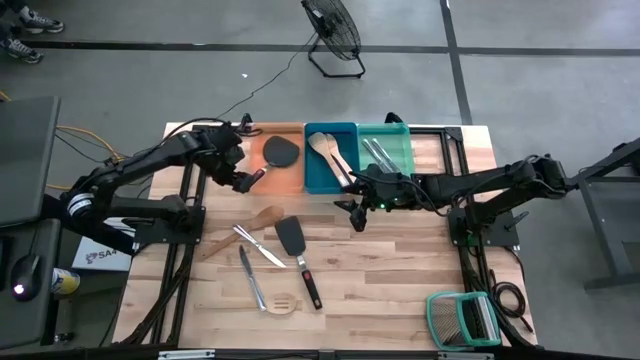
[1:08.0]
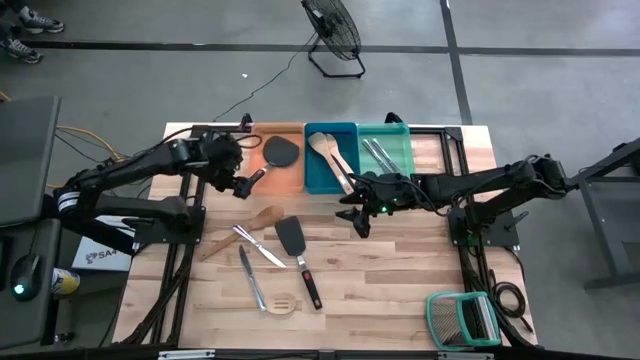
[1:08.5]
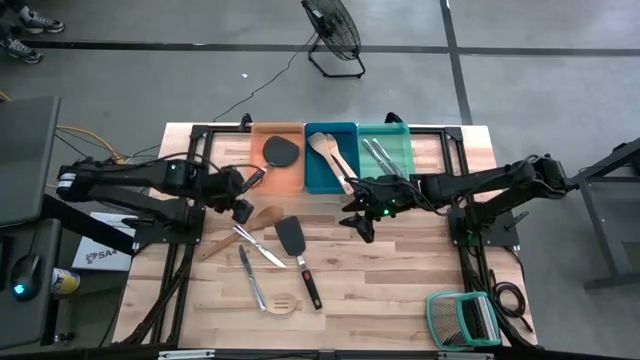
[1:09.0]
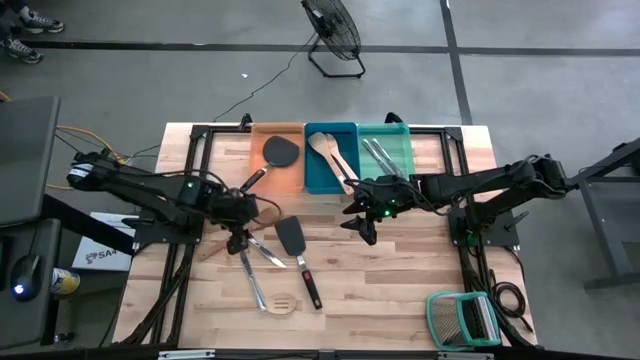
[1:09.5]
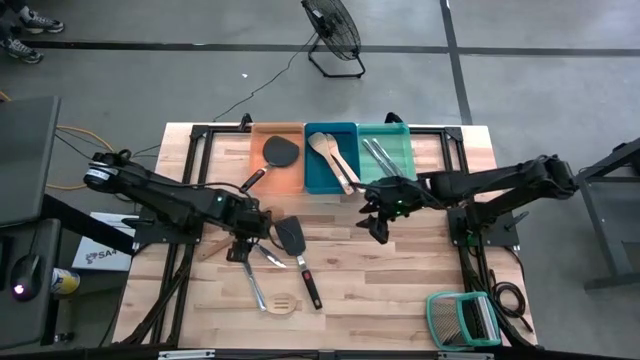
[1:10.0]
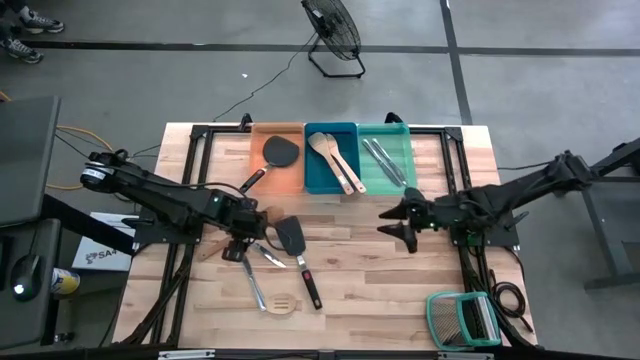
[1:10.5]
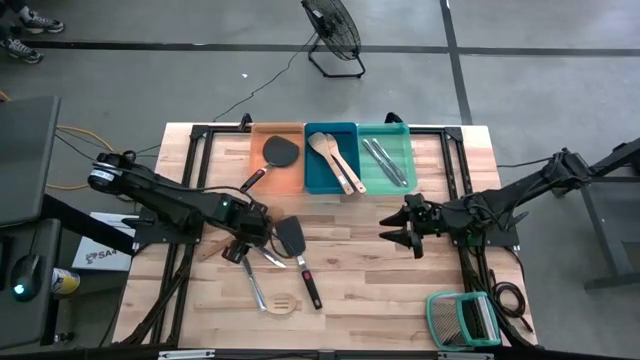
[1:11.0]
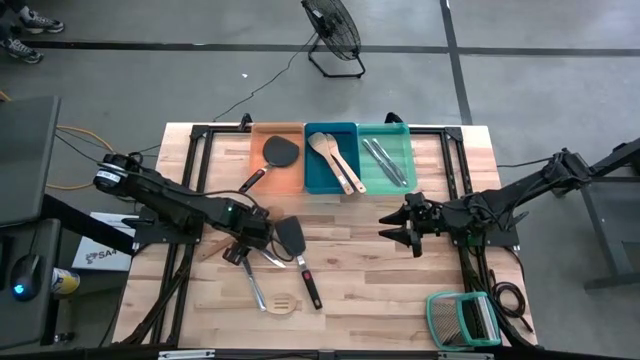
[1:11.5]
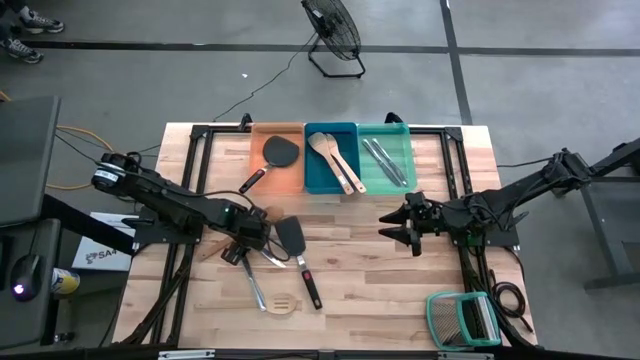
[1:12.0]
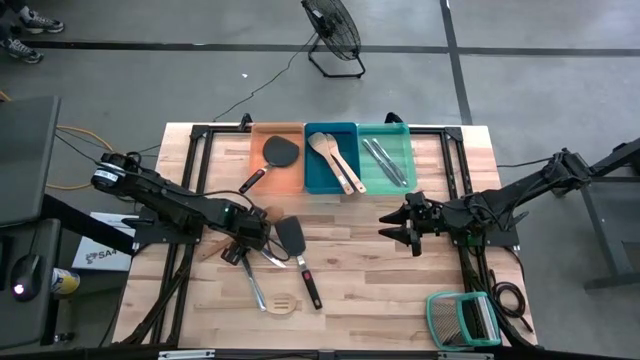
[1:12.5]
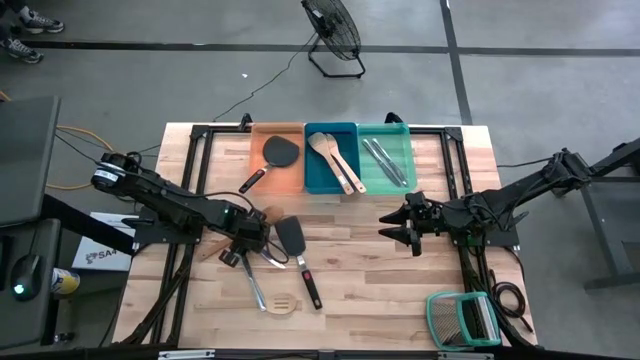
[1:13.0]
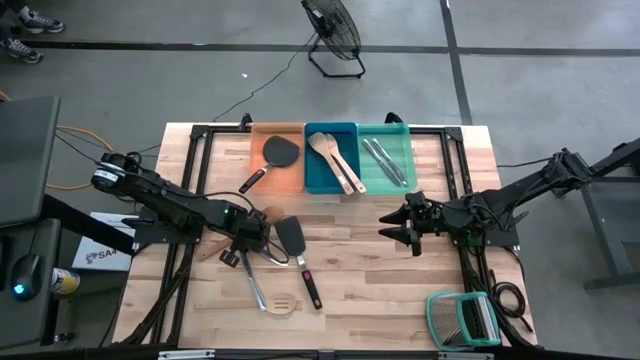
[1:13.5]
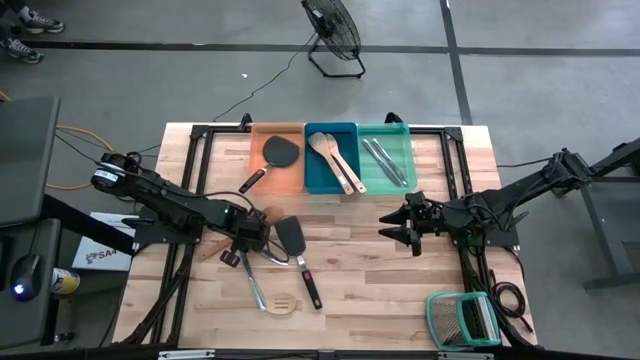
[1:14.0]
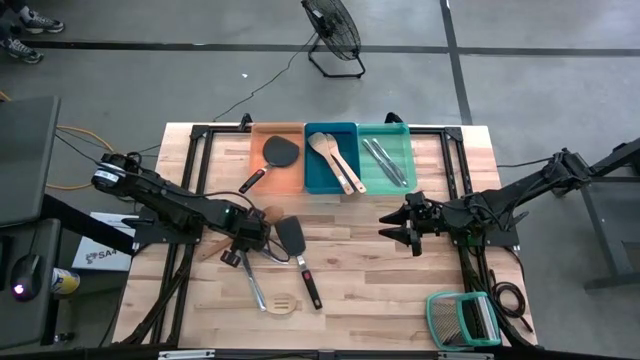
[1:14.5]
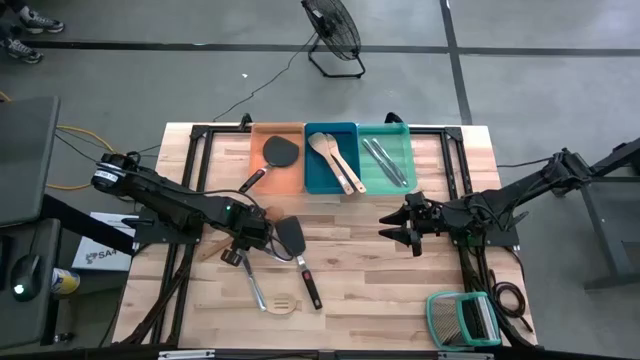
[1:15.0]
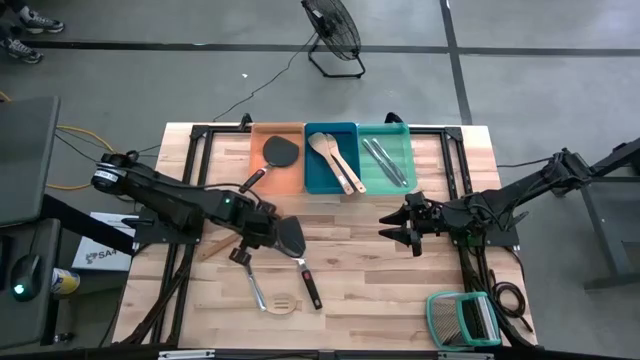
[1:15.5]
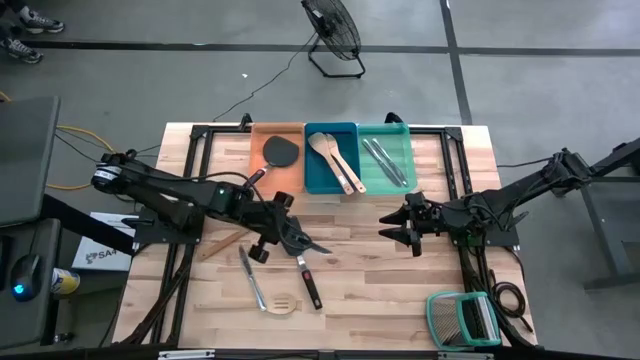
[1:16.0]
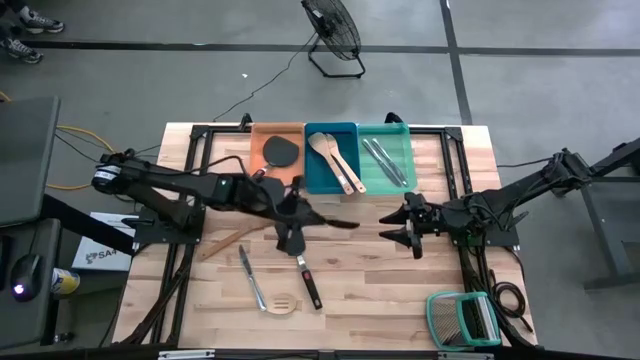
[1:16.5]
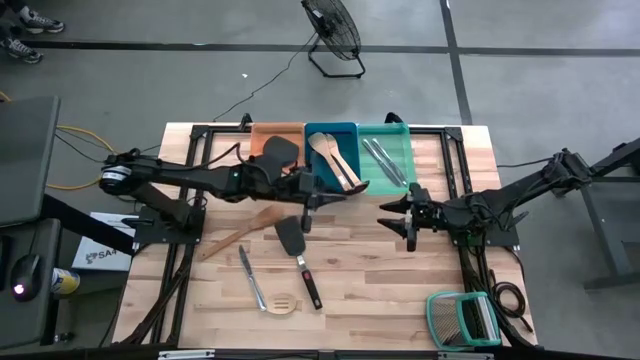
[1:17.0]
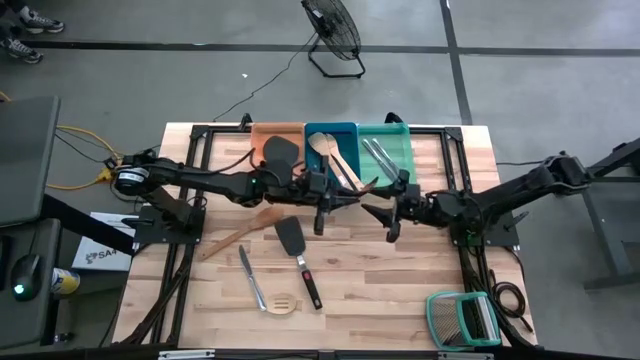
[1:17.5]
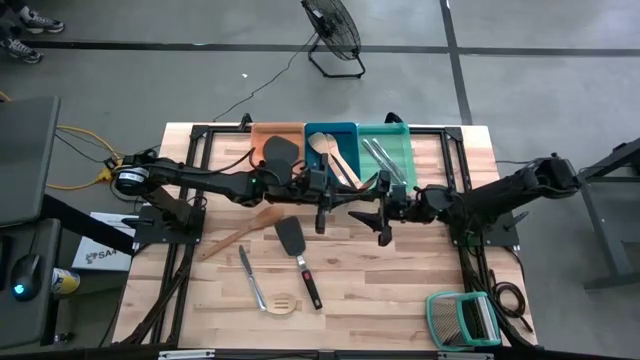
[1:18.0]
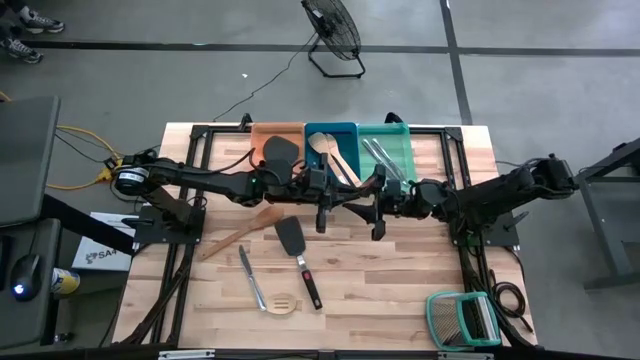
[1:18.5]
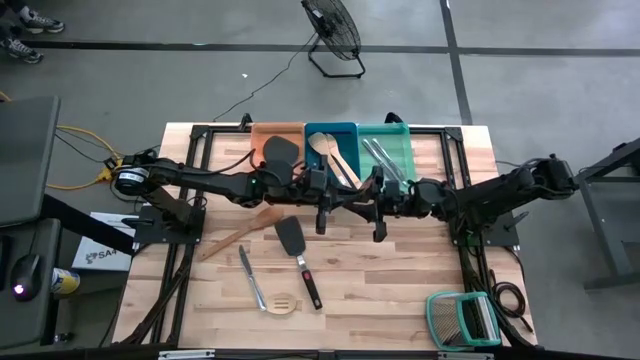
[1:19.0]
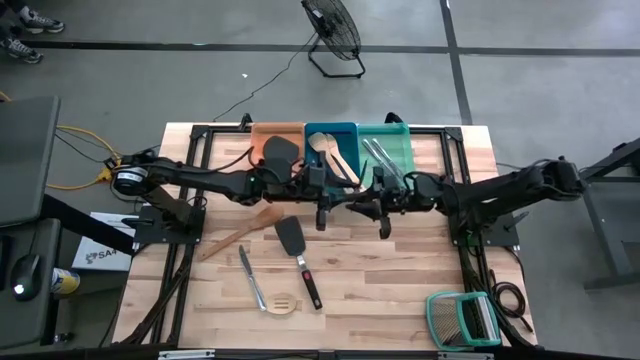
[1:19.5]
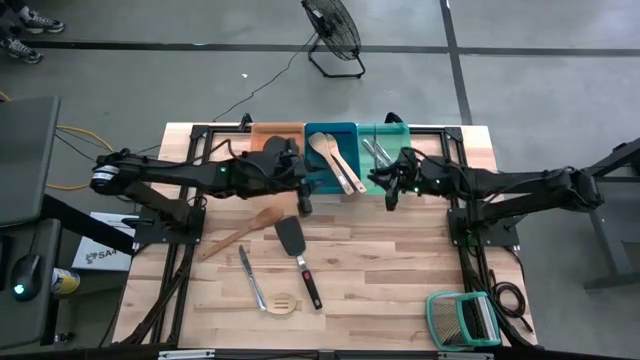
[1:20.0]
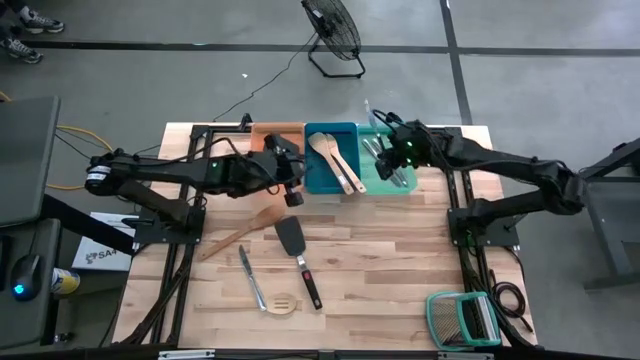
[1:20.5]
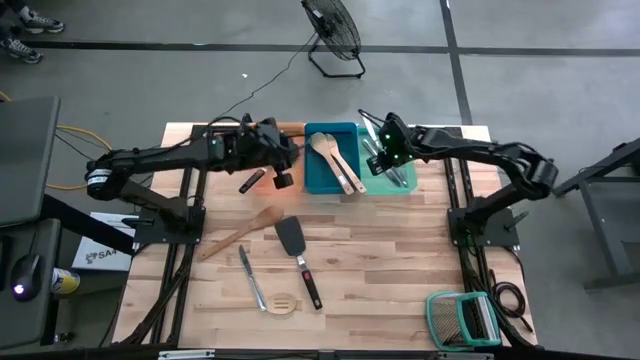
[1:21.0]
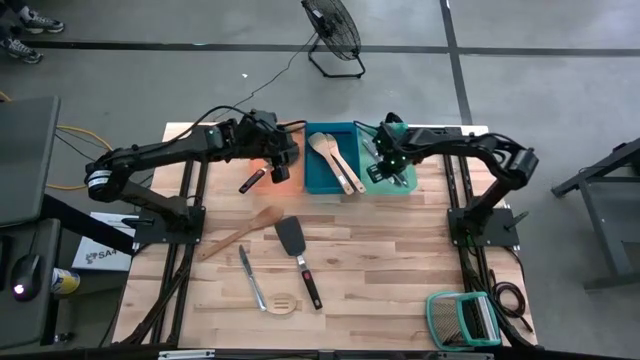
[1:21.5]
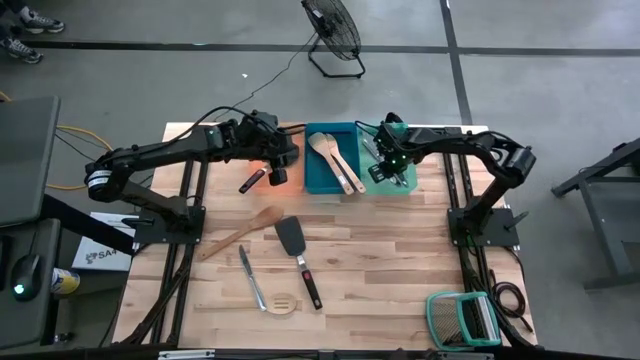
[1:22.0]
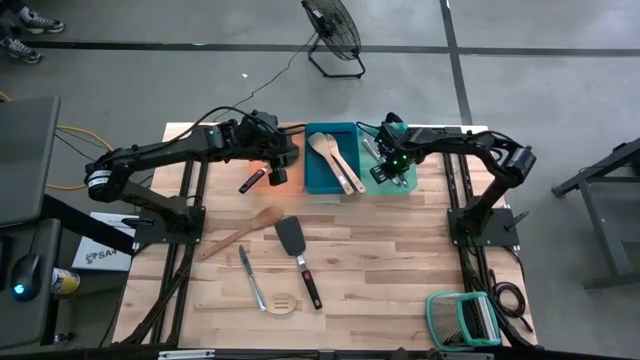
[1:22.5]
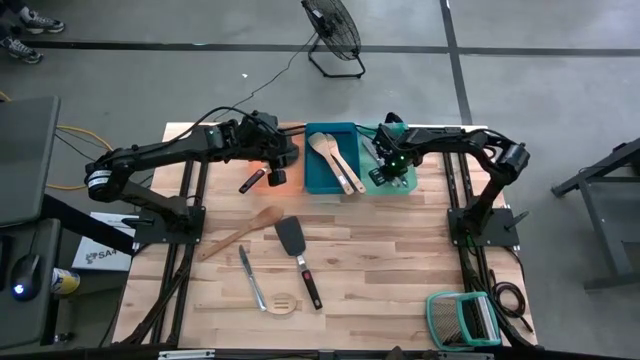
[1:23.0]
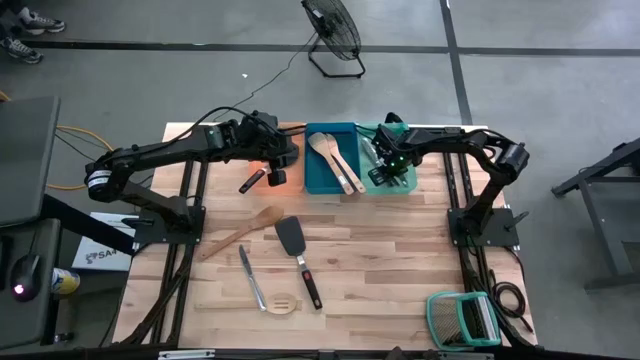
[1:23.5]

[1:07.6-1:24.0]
Task: Pick & Place Kitchen Items
Put the silver knife into the green bin

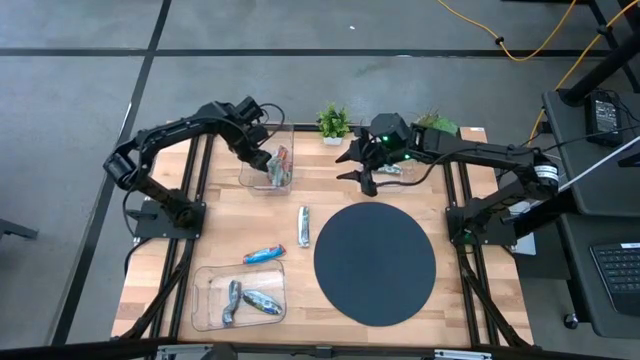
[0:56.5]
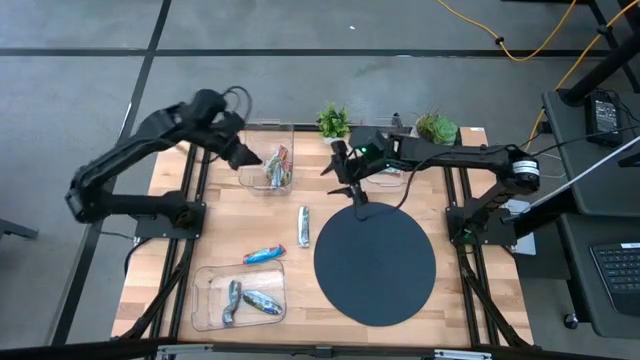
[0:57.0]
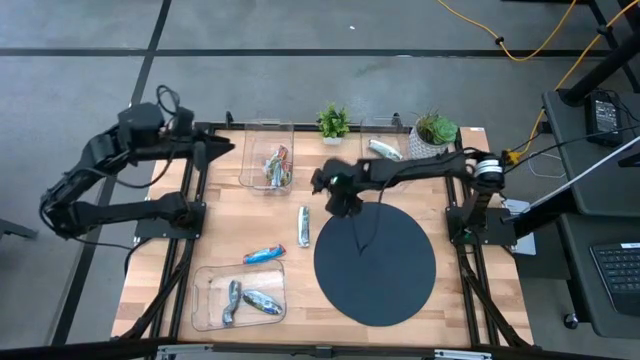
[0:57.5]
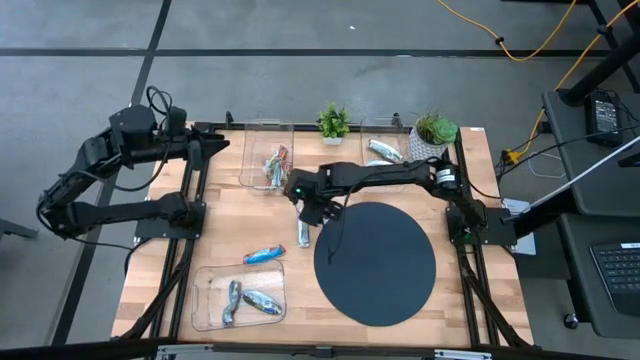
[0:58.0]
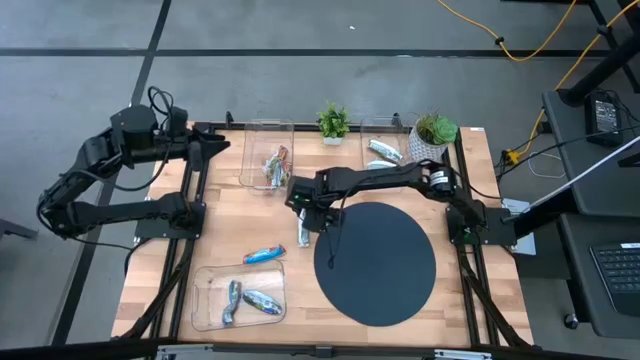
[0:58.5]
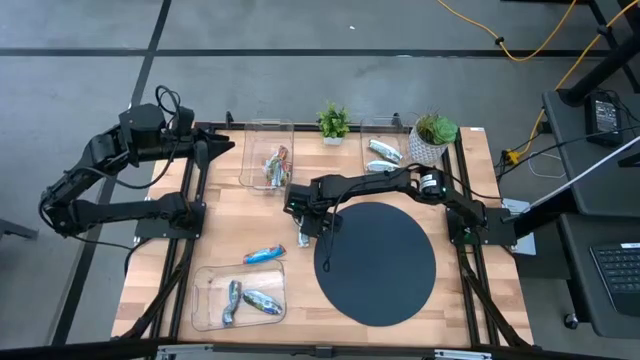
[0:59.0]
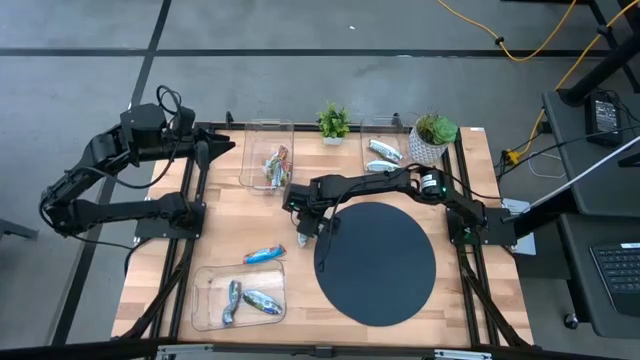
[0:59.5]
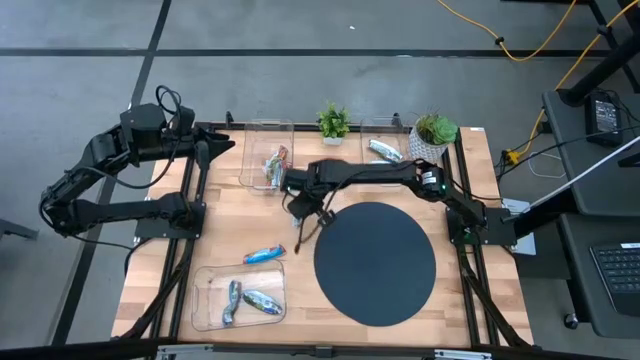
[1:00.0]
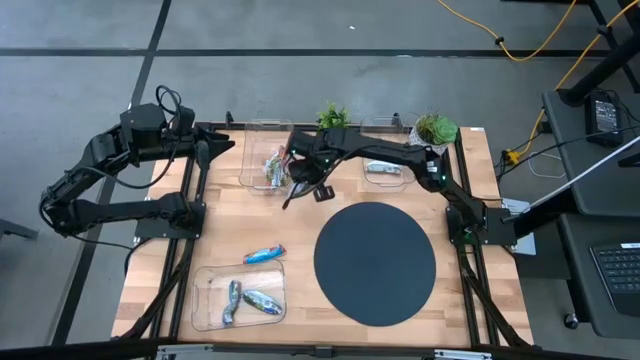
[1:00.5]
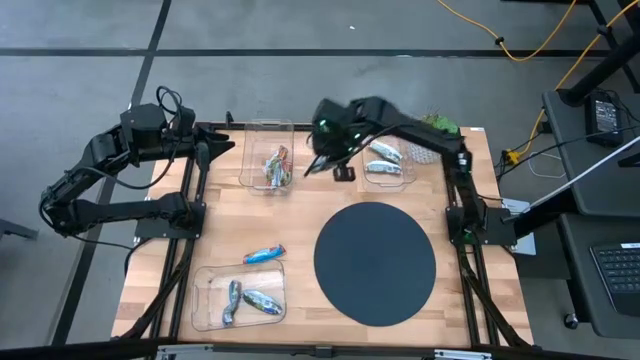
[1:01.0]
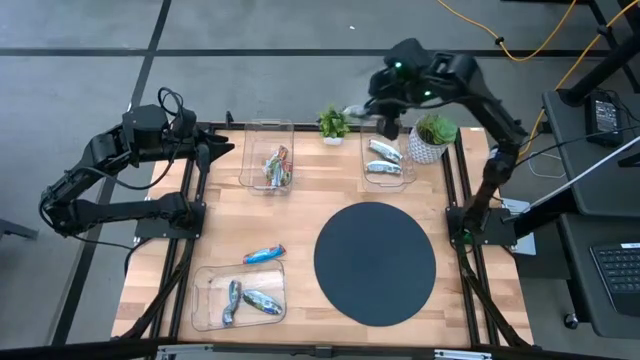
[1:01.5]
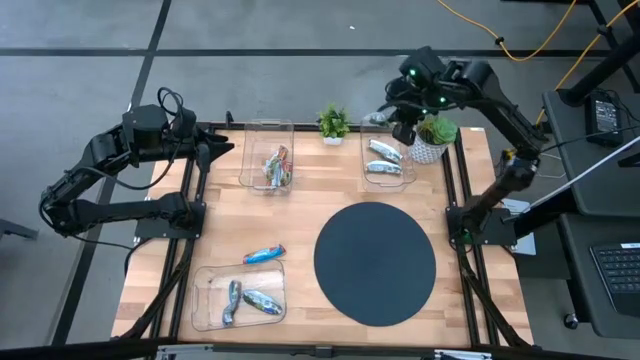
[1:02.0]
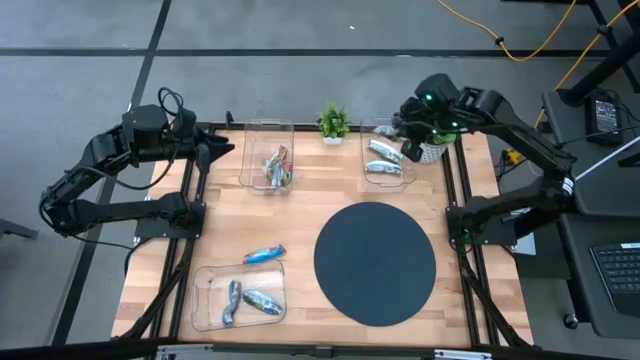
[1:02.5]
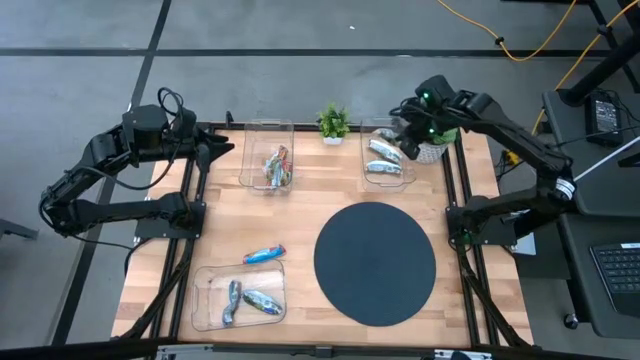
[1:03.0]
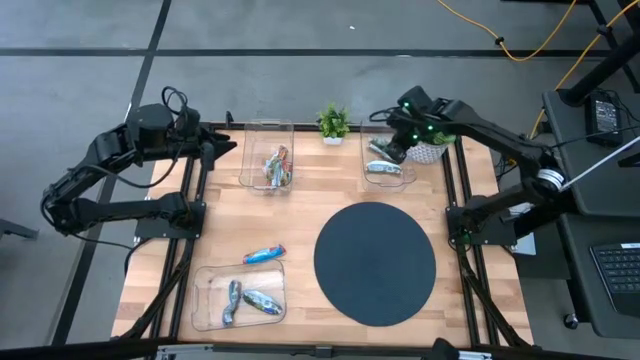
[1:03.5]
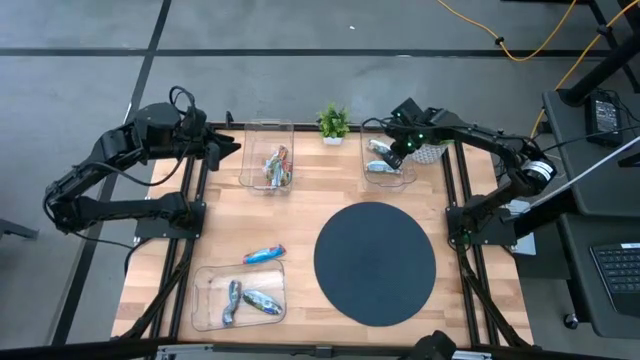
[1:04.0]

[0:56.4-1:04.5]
Task: Pick and place Granola Bars by type
Put the yellow granola bar into the top right transparent bin
